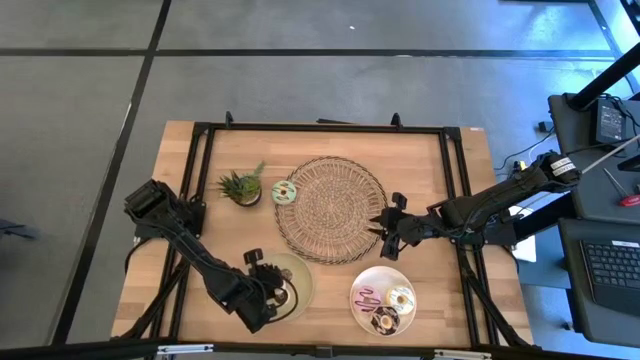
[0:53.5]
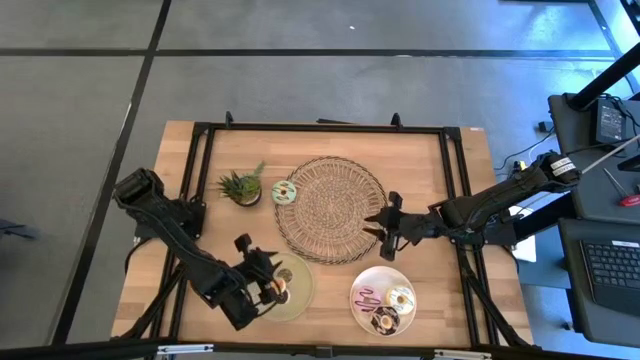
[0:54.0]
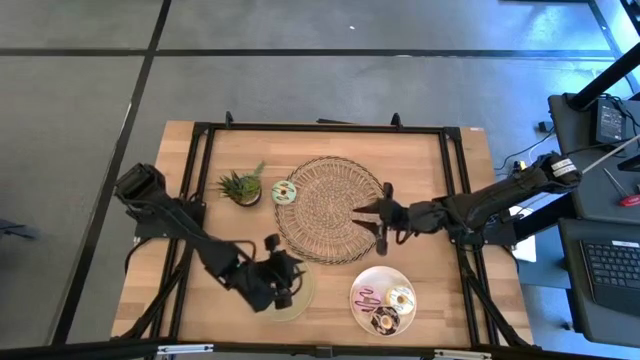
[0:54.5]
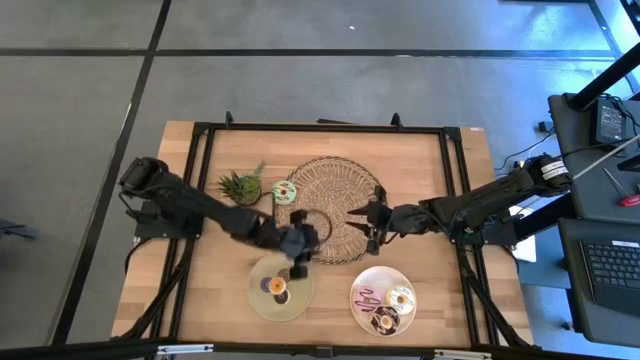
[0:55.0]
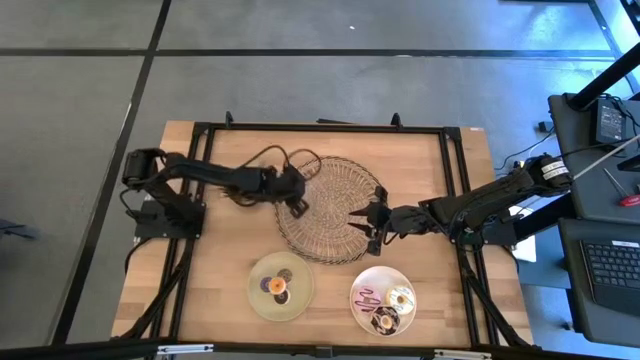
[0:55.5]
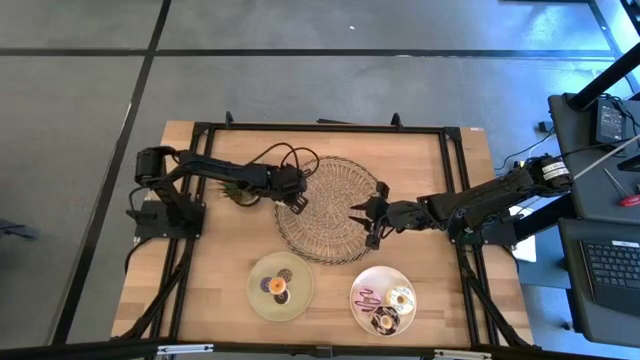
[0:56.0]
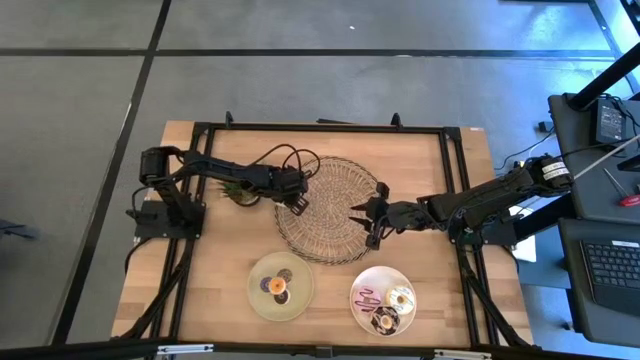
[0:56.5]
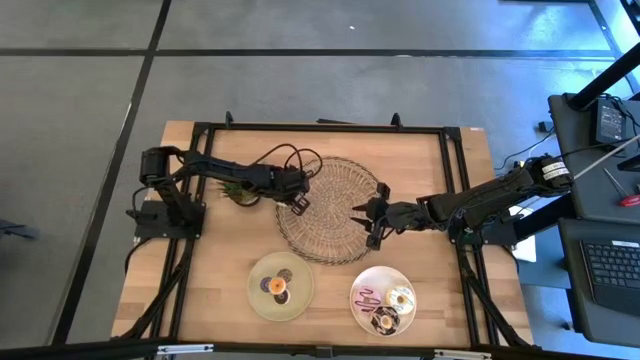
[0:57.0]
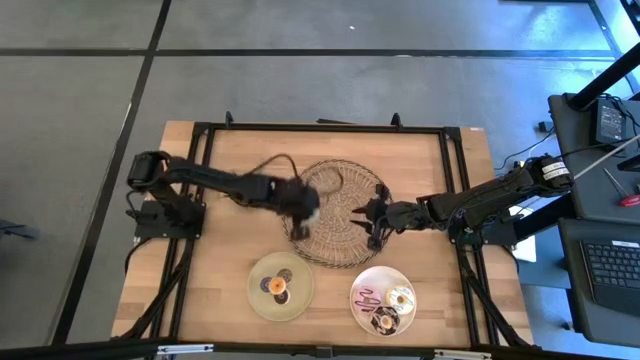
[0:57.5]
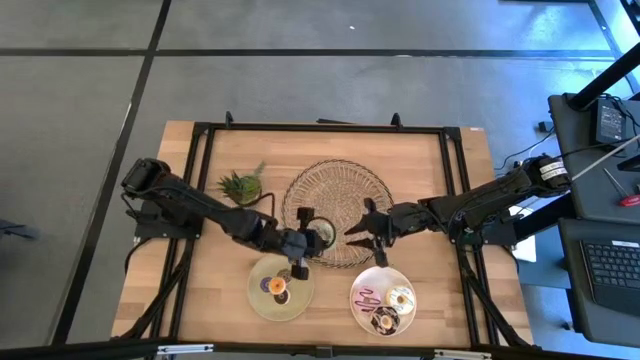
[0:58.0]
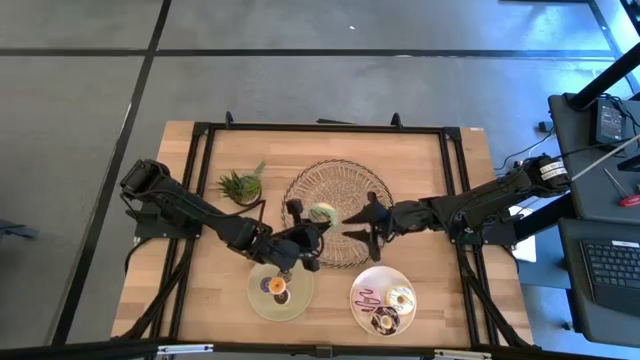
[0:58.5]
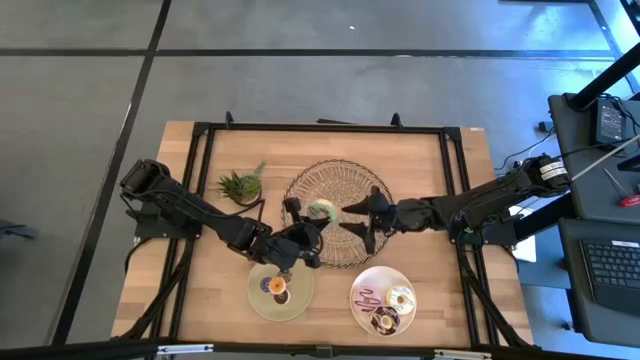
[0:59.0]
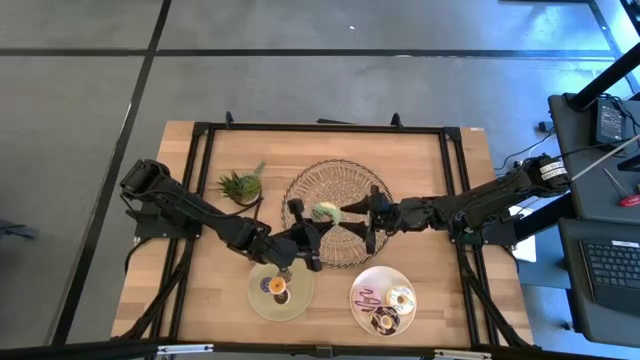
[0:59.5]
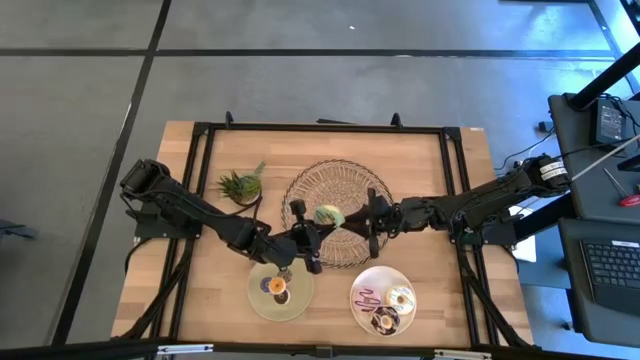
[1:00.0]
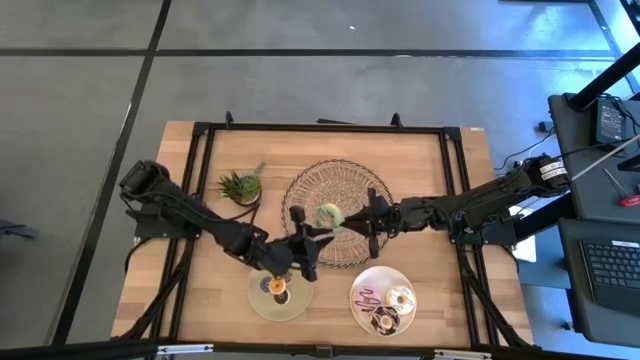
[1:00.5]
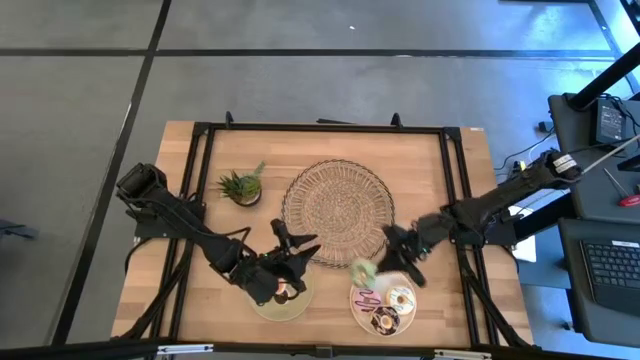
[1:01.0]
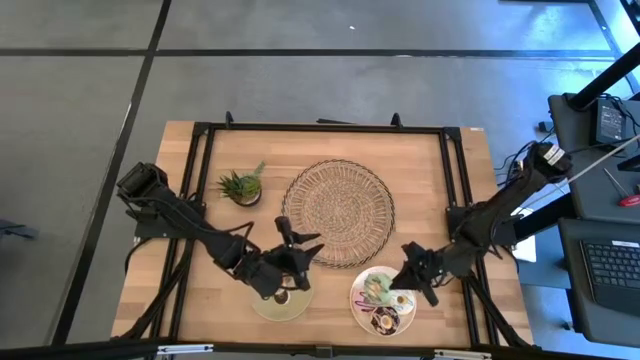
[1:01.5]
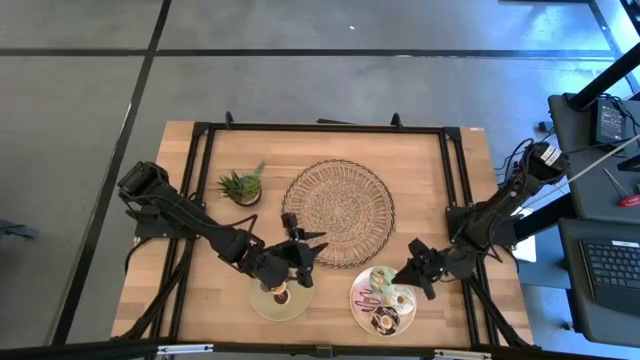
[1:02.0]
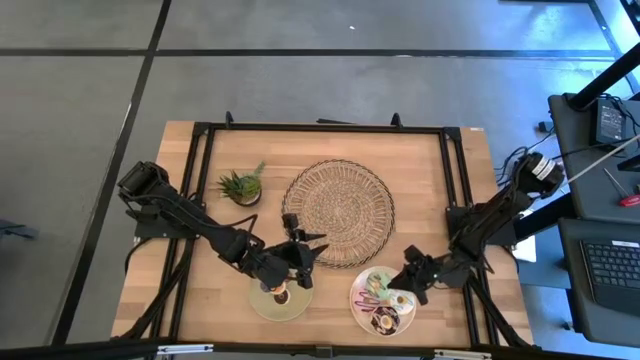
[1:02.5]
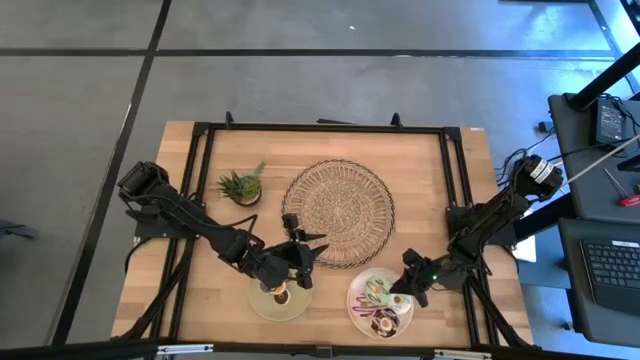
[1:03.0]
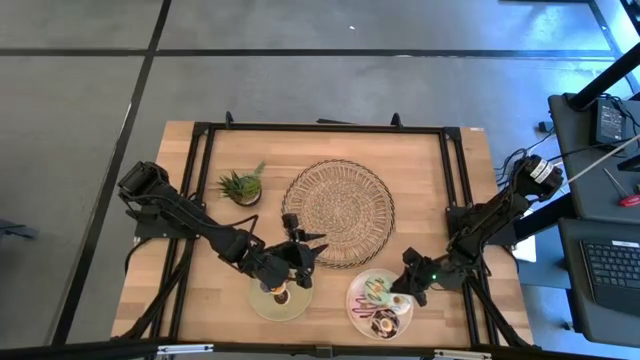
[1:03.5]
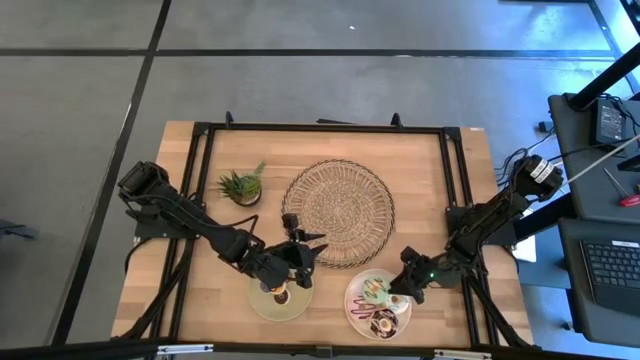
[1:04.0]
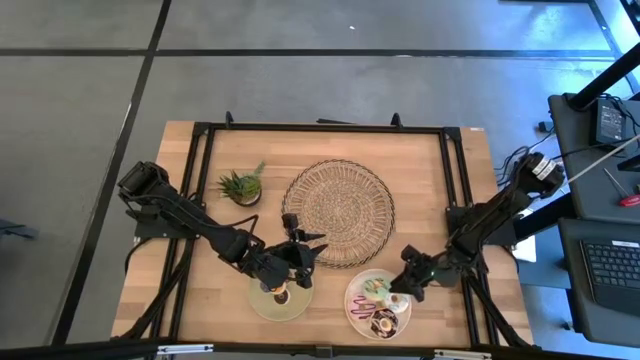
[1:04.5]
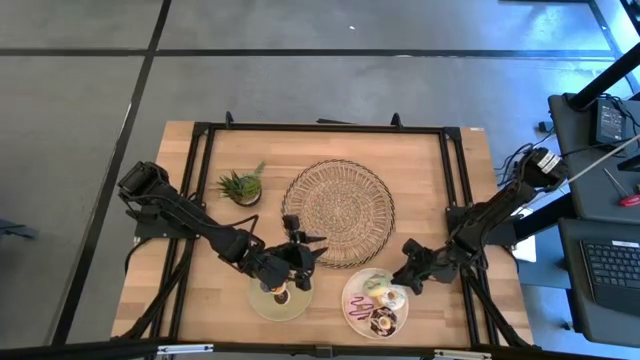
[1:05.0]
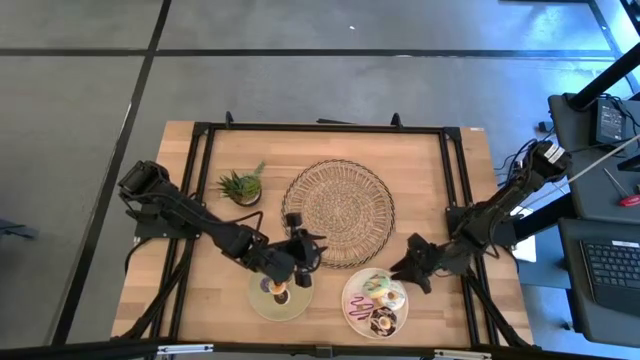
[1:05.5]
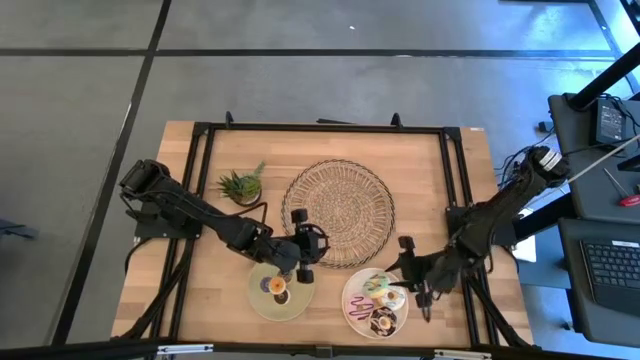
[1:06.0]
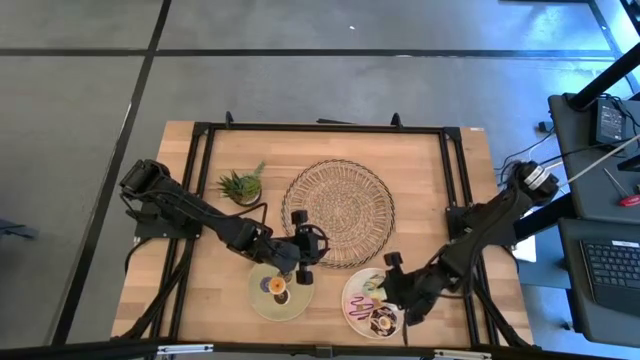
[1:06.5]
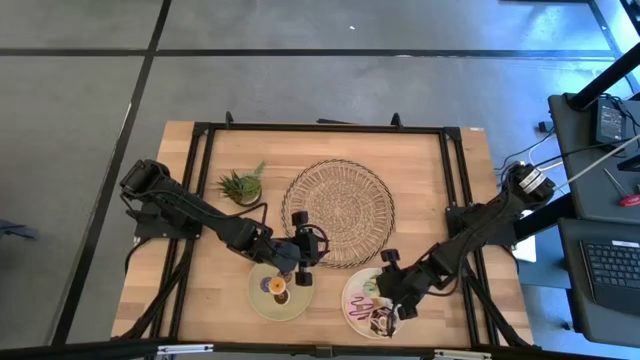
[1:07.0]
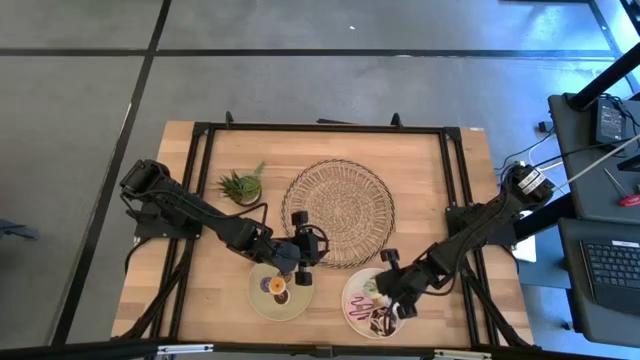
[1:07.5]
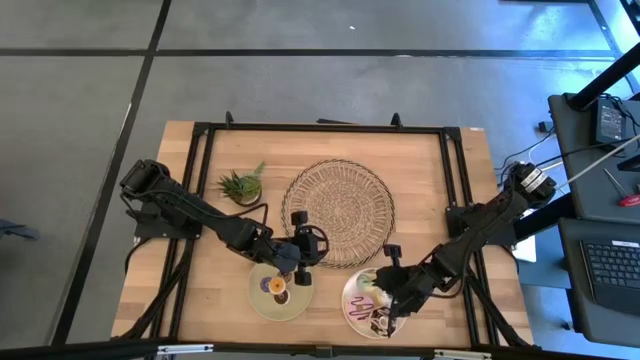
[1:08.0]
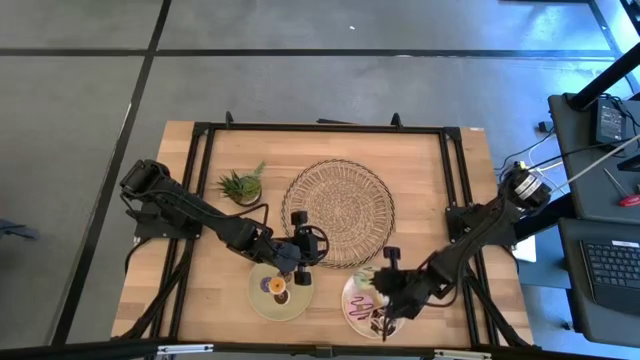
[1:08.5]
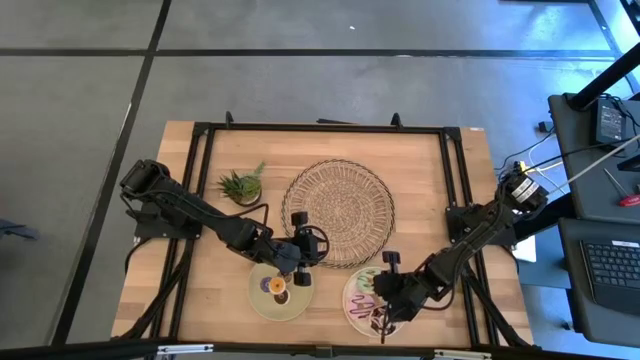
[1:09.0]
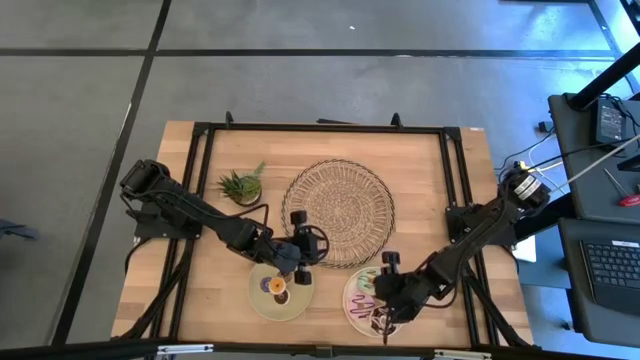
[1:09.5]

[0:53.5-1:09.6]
Task: Pick & Place donuts
Put the big light green donut on the white plate

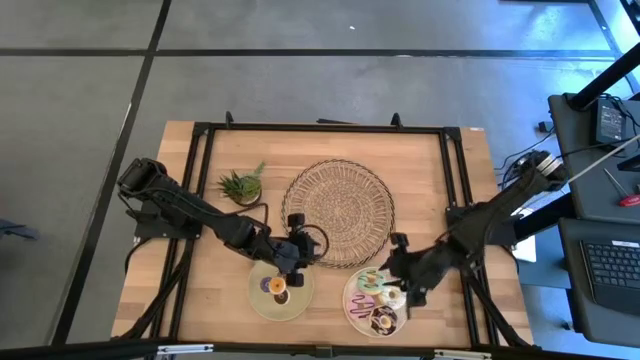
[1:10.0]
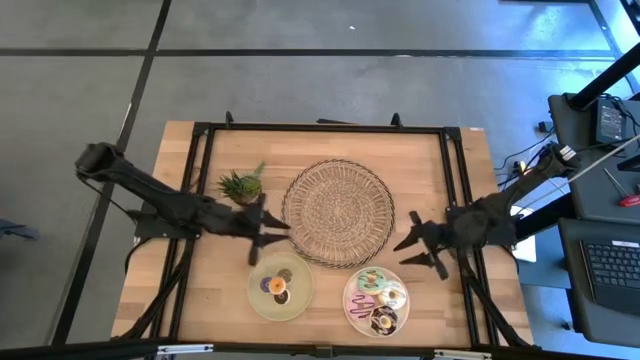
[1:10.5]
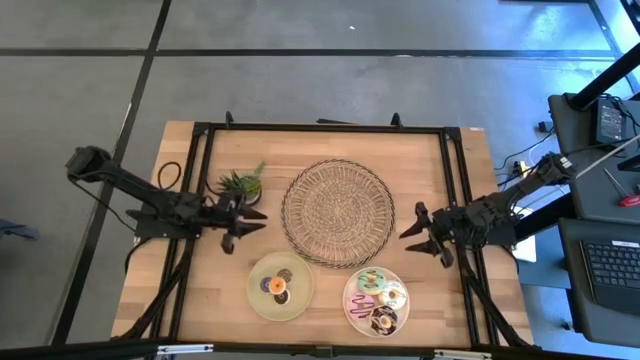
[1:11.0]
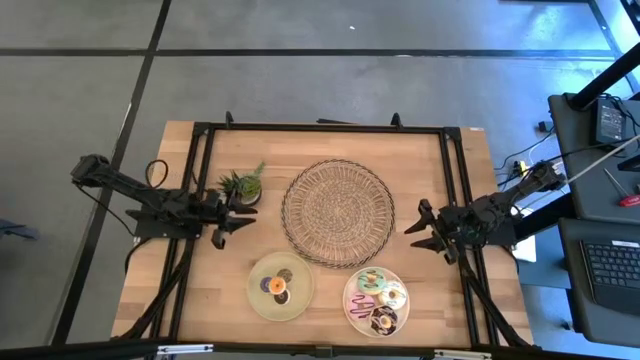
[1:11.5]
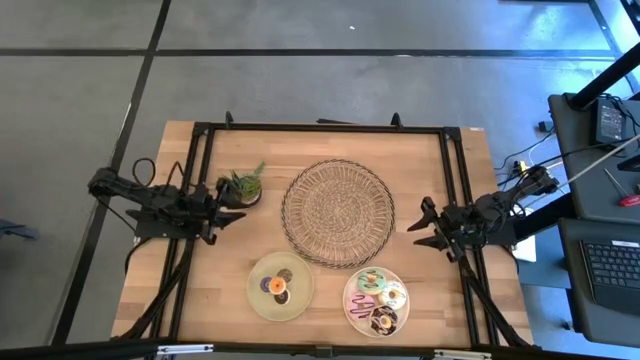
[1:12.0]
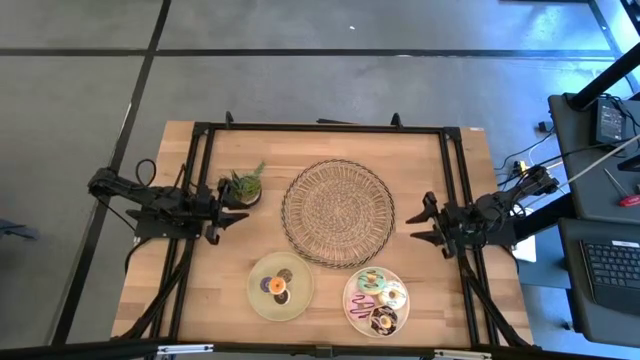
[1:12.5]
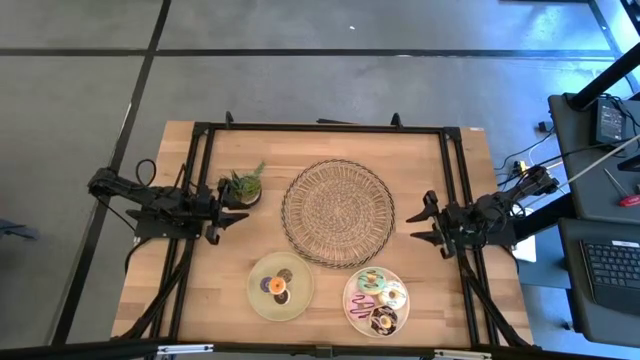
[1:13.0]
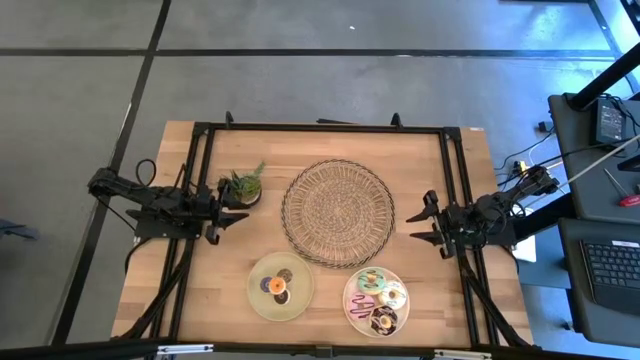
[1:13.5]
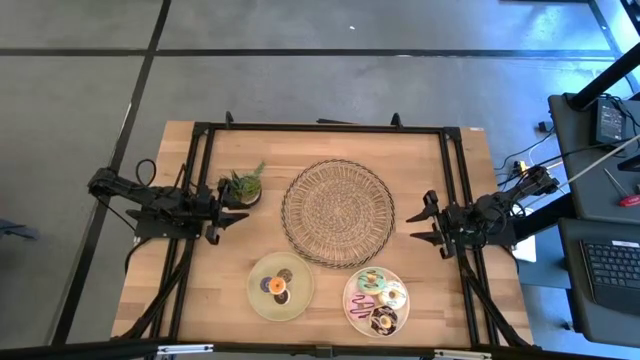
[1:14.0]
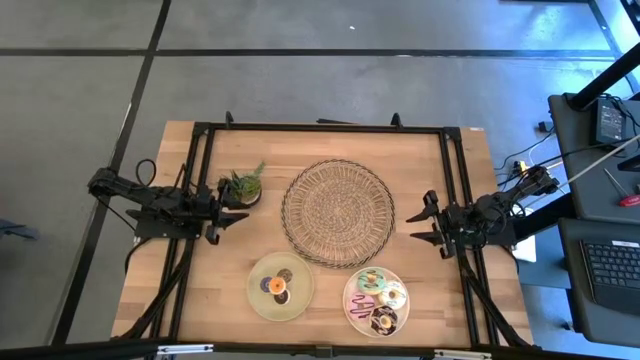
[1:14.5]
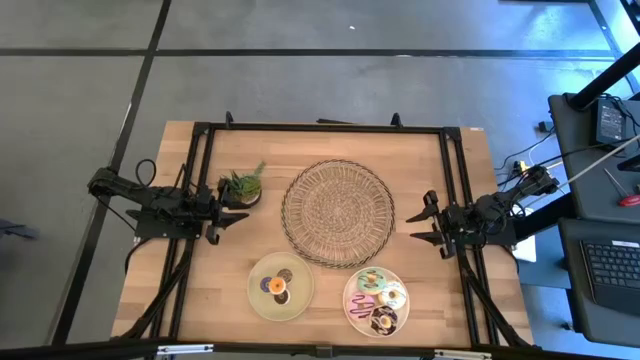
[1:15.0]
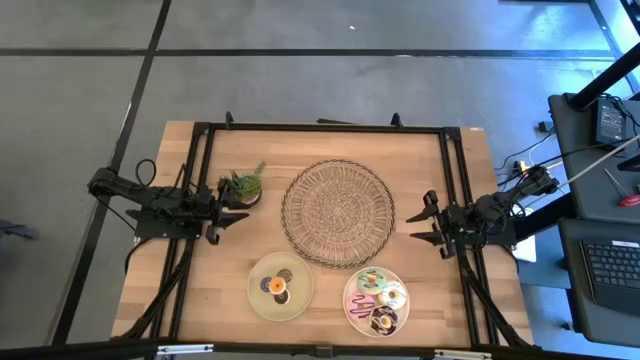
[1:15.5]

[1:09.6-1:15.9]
Return to Home Position
